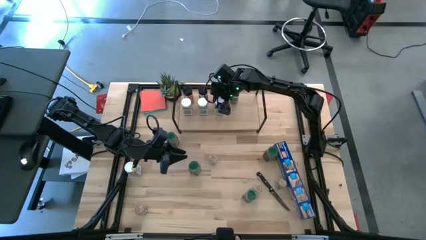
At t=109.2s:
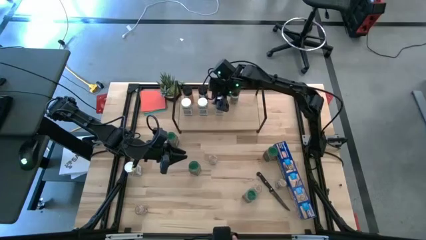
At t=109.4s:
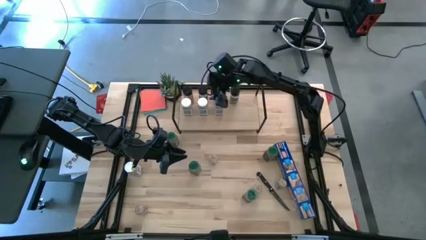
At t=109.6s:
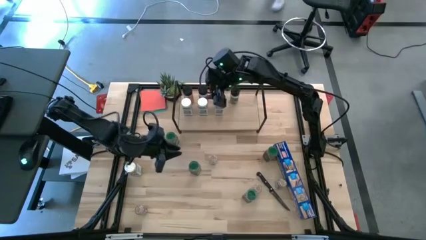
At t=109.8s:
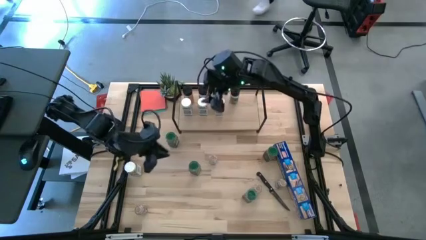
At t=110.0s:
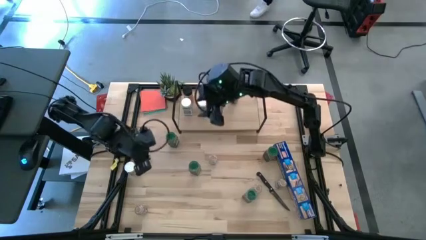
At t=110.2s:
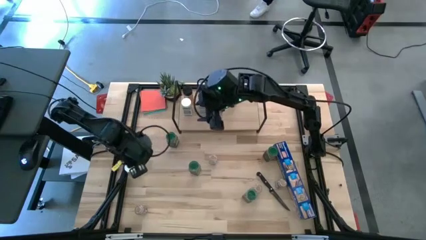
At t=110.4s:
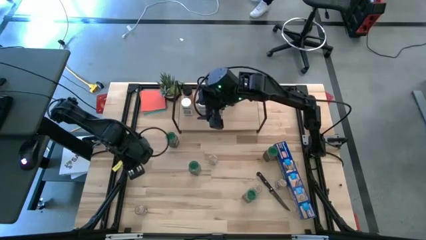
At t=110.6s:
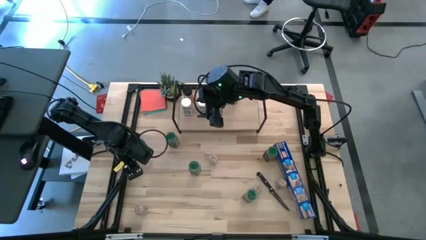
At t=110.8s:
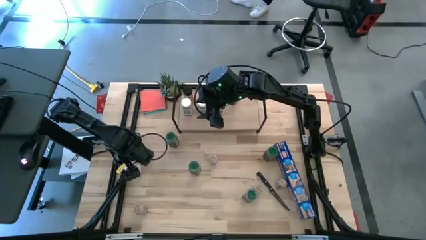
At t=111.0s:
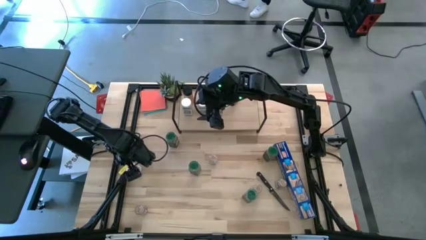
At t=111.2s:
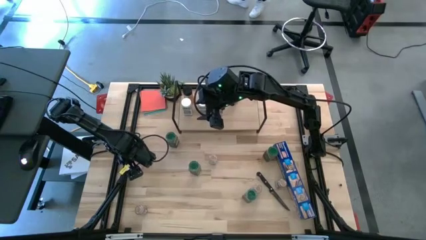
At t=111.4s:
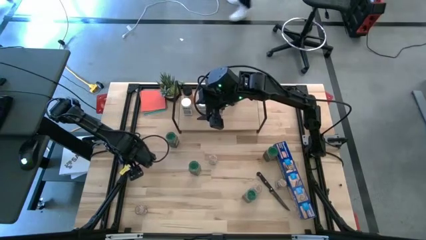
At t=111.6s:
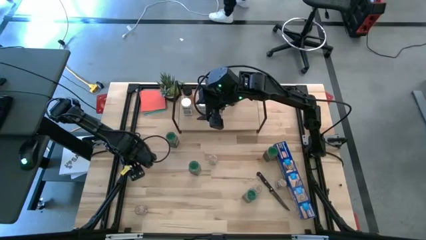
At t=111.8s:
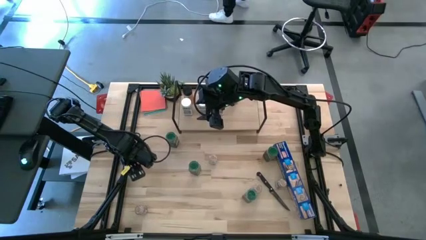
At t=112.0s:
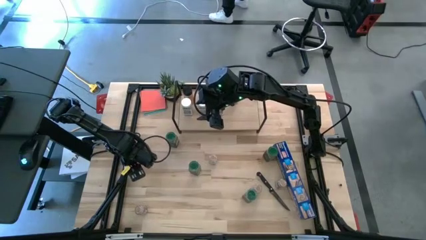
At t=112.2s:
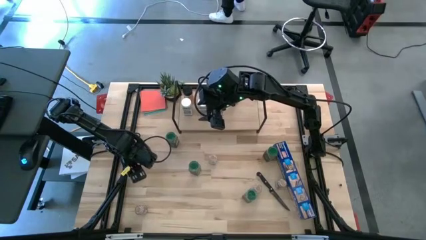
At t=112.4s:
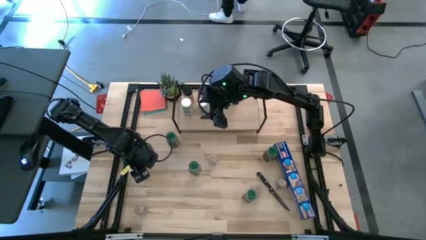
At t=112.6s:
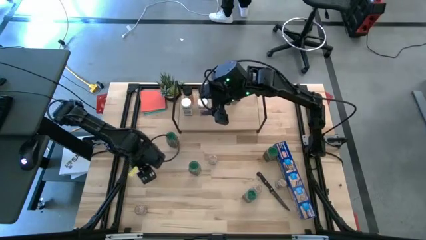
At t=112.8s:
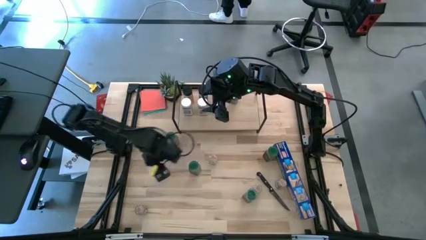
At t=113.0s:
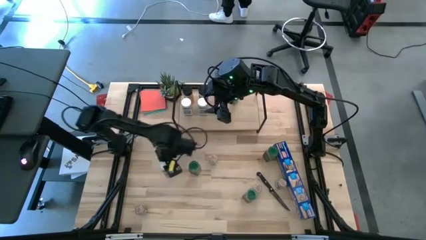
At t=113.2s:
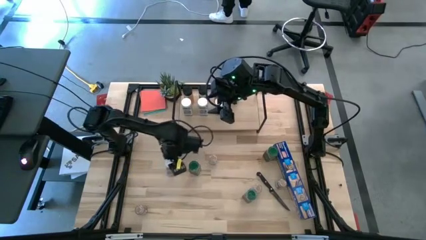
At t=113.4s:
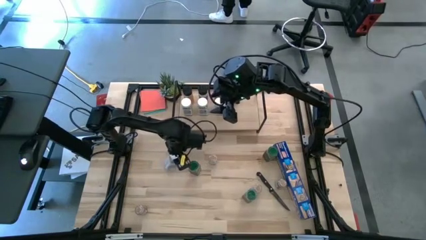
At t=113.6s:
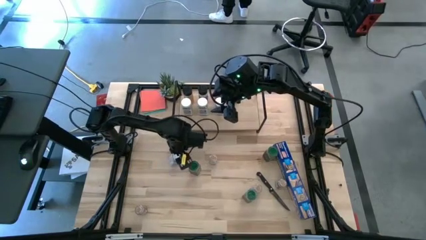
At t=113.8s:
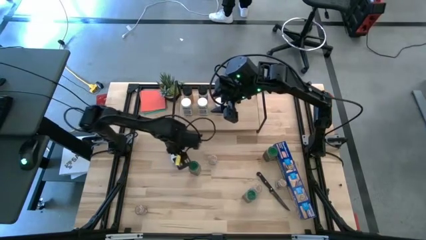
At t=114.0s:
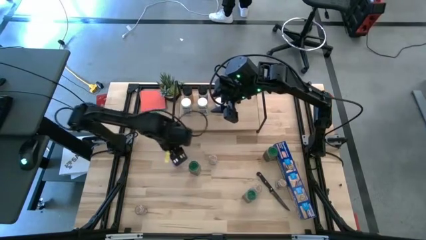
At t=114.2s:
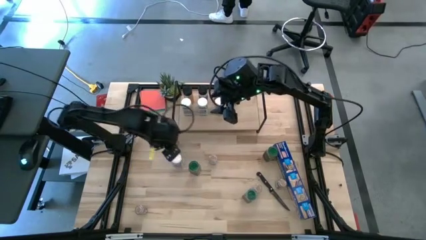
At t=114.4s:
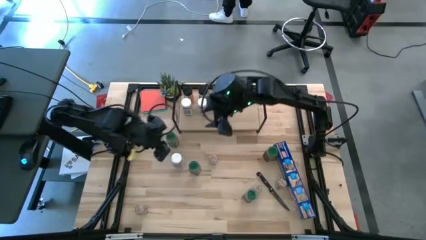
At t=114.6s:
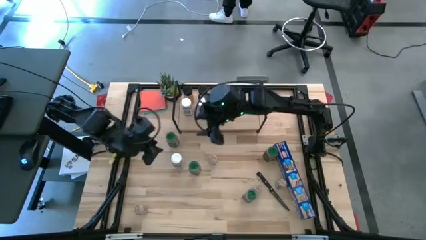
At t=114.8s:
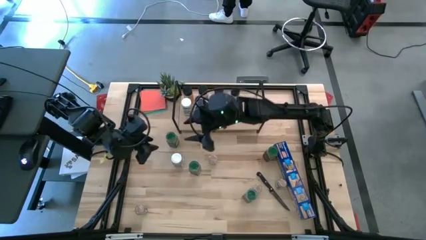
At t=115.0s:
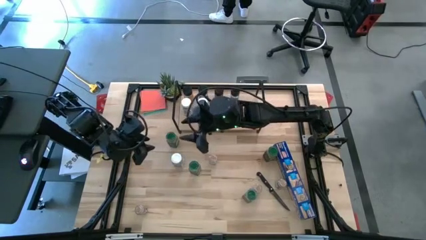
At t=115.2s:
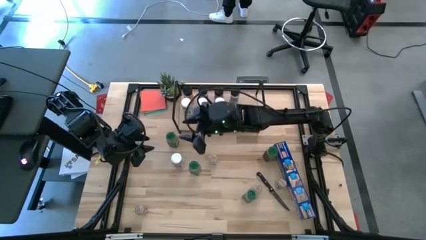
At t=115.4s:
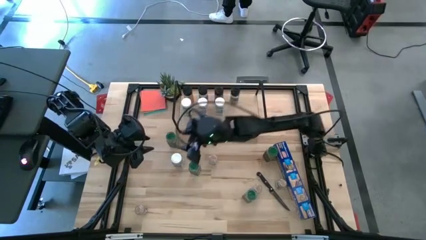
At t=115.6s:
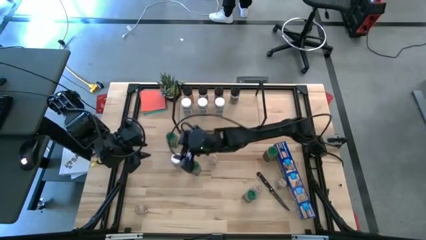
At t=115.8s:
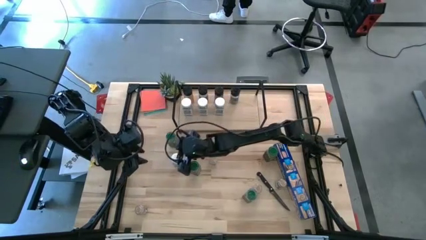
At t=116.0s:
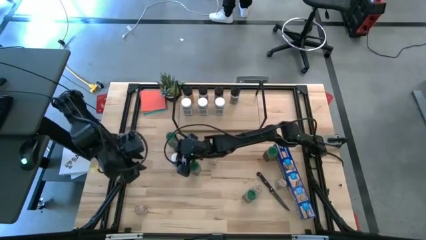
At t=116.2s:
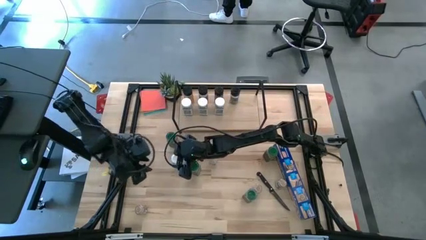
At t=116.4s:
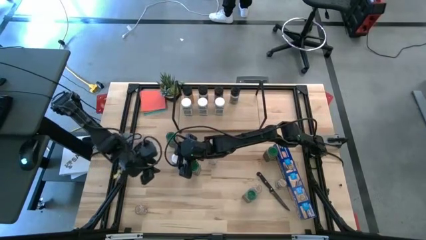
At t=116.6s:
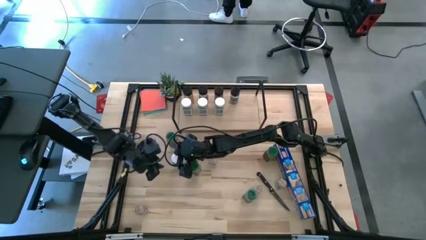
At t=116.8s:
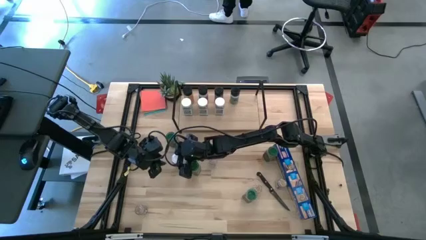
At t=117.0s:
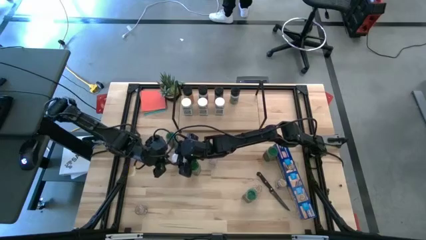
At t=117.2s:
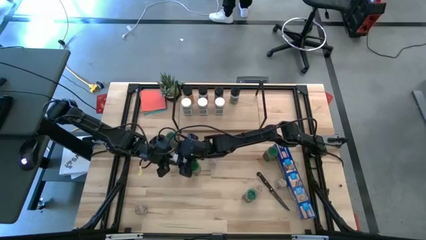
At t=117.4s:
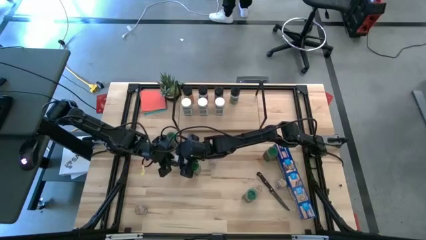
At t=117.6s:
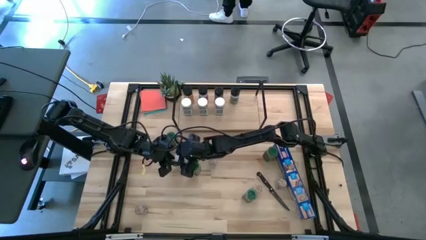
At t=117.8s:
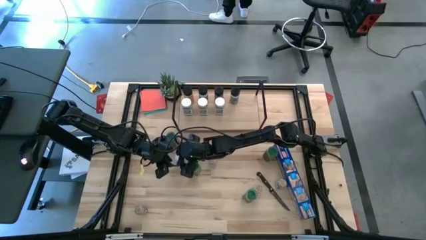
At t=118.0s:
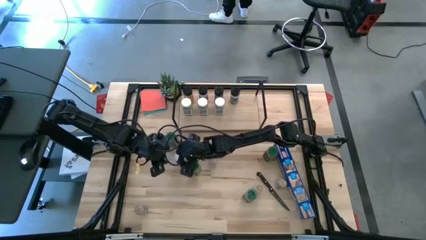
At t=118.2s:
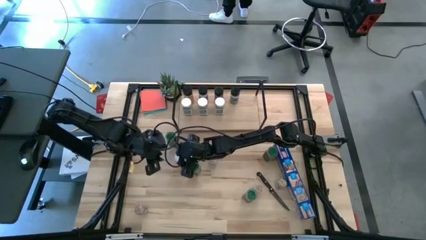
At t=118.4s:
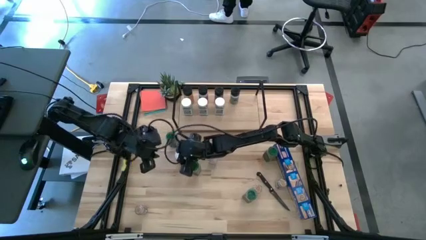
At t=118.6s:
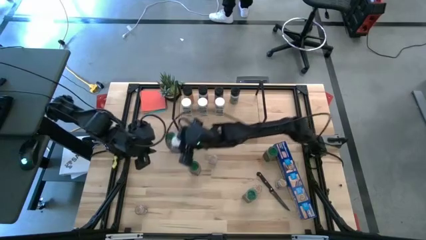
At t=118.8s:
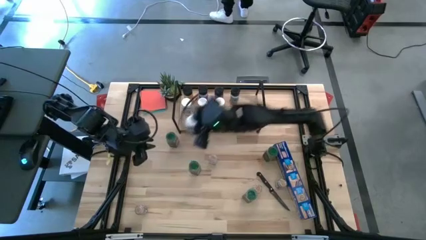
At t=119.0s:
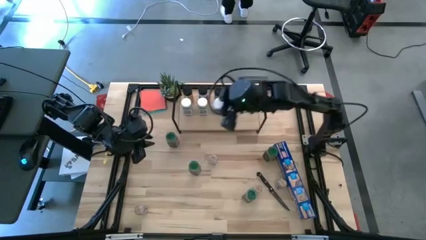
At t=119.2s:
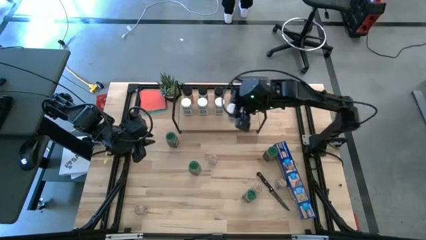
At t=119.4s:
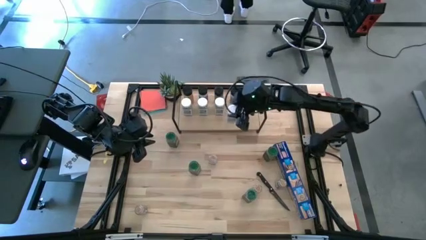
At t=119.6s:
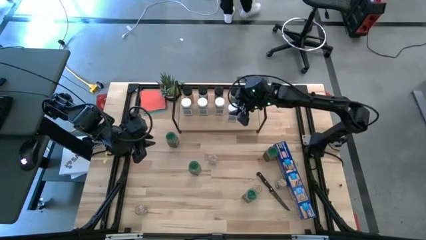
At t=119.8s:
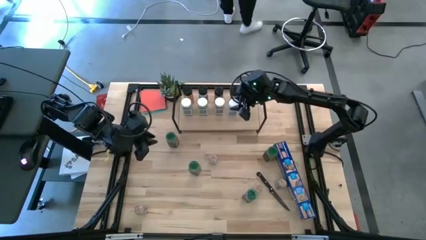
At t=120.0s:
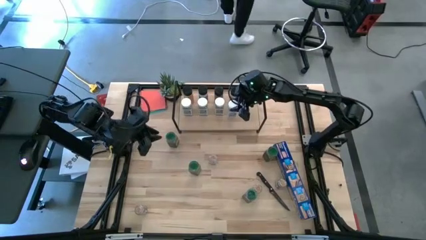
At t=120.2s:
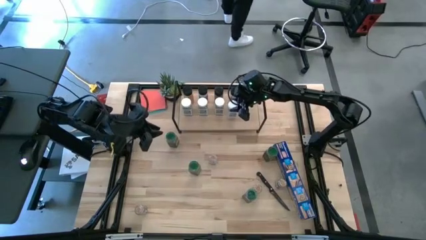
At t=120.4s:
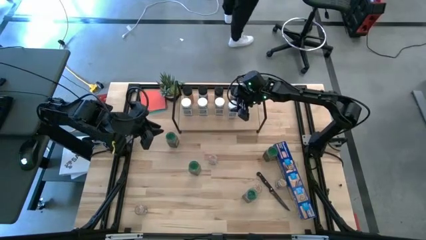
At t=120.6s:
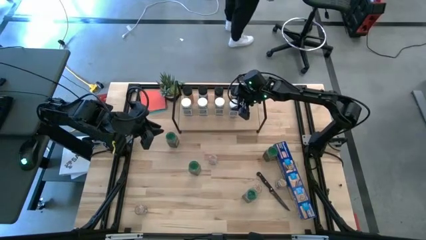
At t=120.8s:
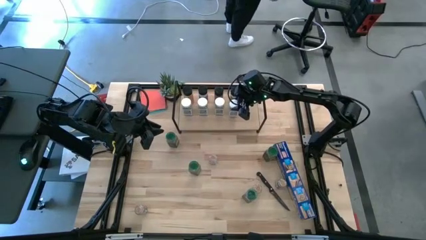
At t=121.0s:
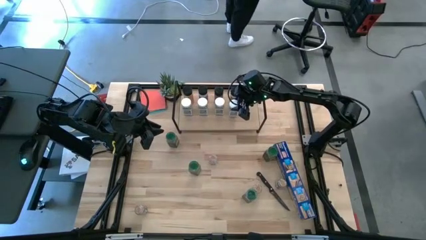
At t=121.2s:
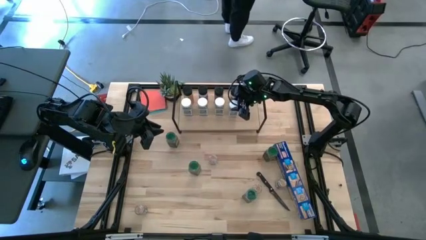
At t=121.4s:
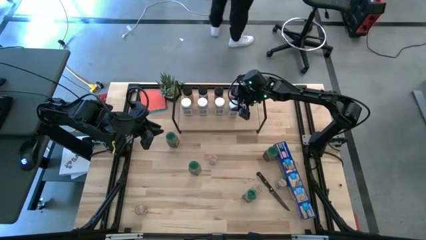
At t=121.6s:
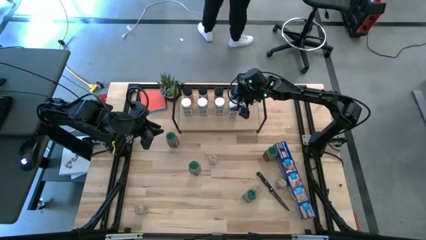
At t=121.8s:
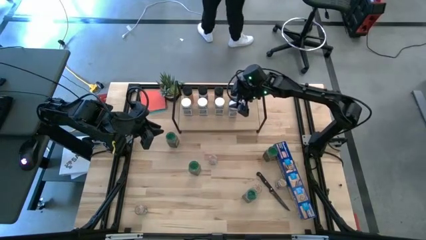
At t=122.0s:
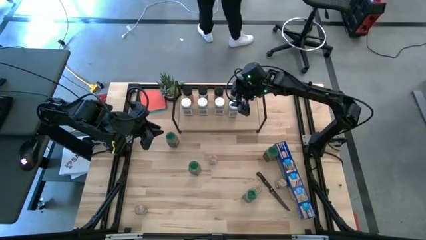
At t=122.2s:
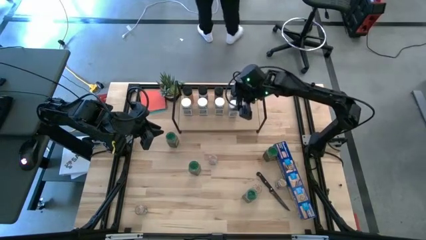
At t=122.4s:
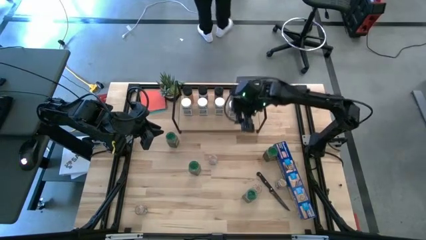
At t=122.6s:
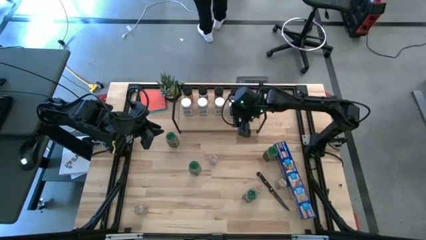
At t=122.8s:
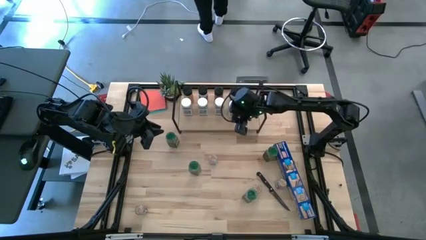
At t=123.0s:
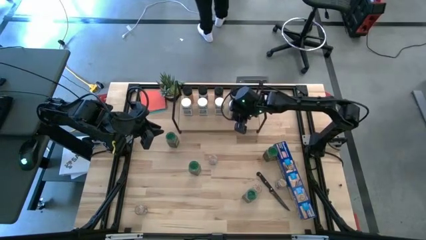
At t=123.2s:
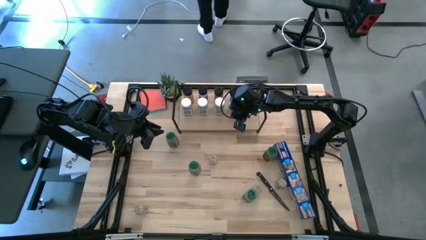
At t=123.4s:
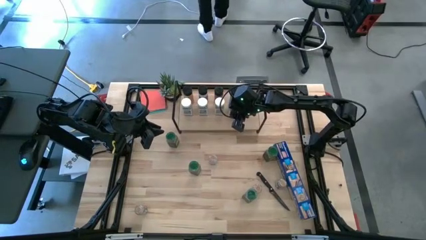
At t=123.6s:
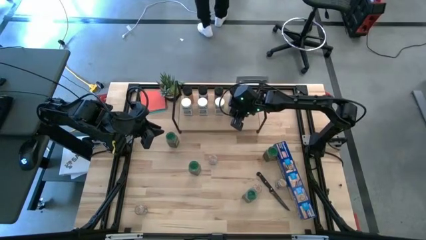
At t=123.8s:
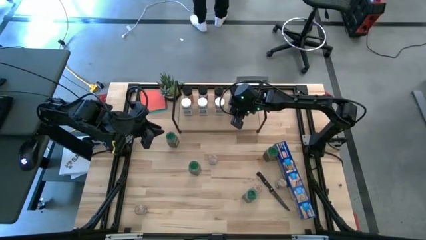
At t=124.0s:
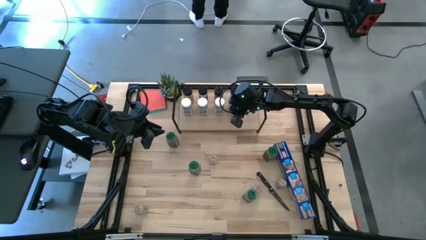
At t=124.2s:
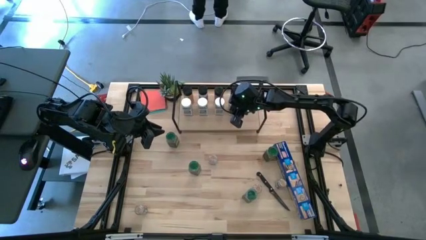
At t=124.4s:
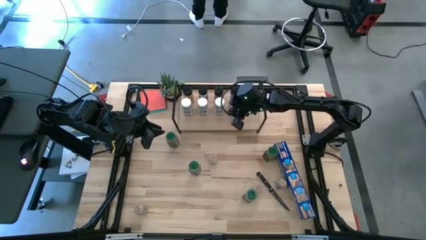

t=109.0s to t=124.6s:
Task: Shelf spices
Put the white seasoning bottle on the shelf aligned with the black seasoning bottle

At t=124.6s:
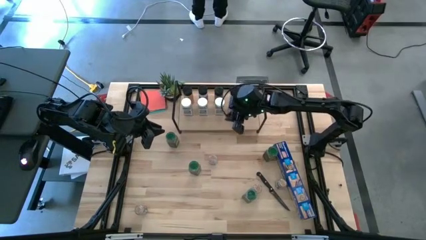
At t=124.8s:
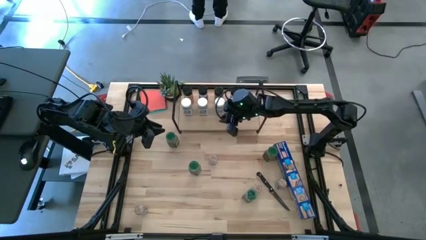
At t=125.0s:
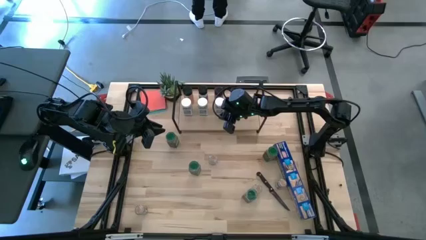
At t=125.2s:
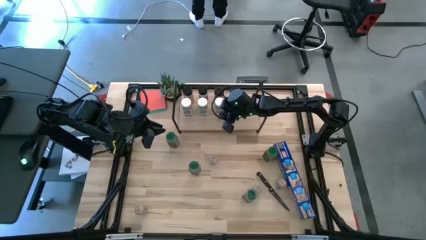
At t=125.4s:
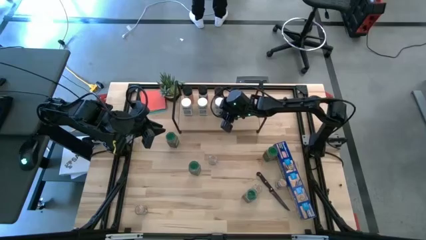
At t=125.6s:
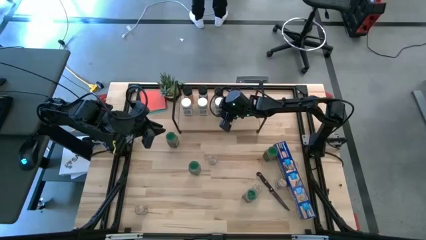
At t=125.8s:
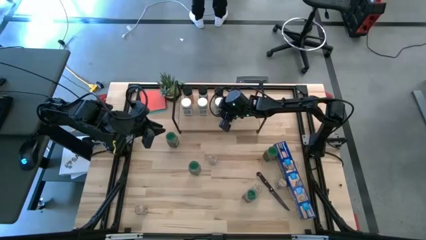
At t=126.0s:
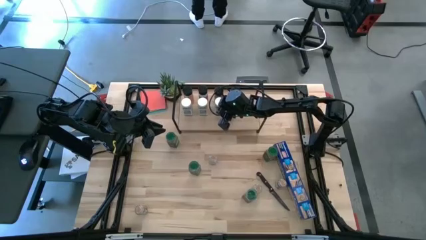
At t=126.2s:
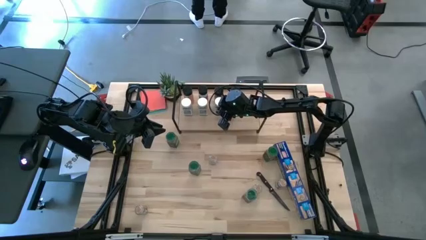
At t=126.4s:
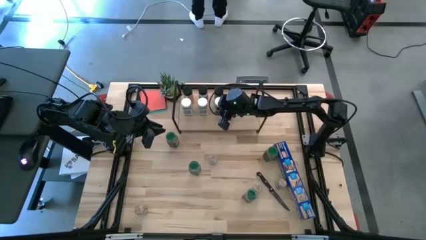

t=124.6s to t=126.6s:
Adjust the white seasoning bottle
